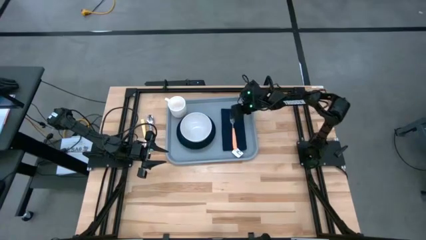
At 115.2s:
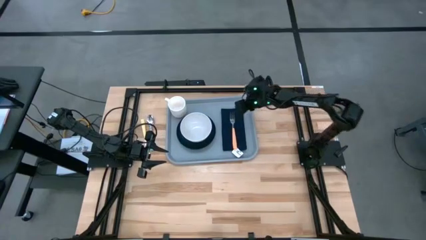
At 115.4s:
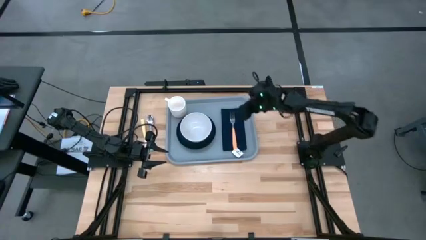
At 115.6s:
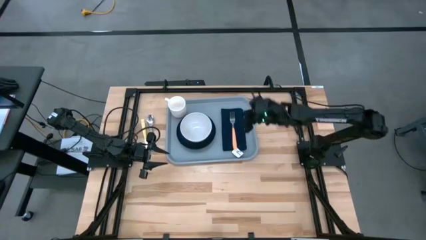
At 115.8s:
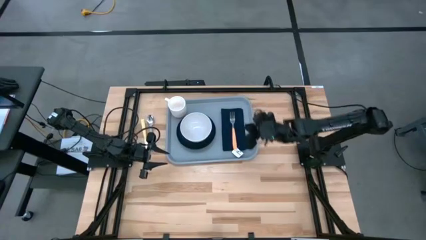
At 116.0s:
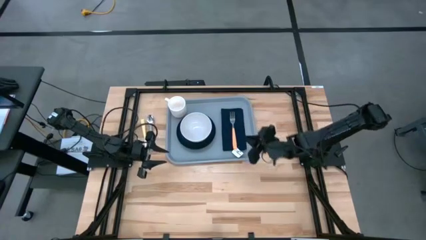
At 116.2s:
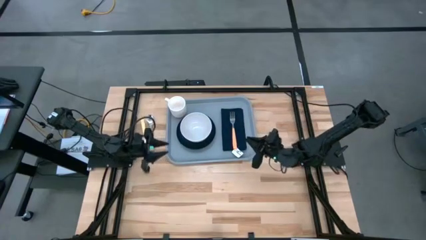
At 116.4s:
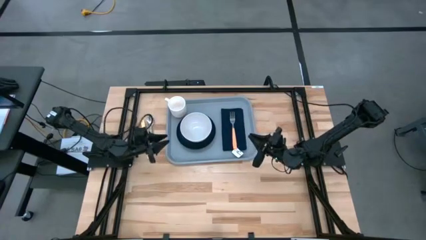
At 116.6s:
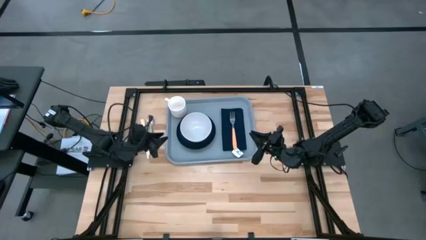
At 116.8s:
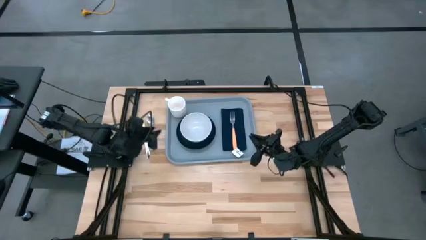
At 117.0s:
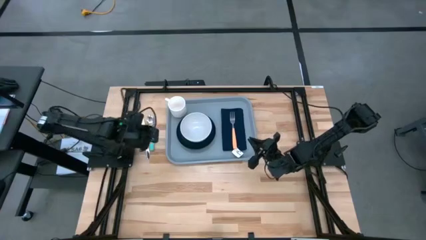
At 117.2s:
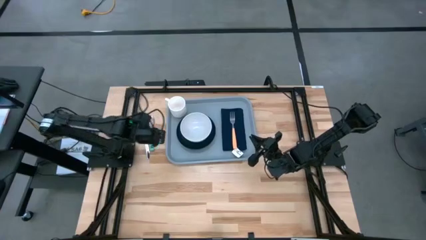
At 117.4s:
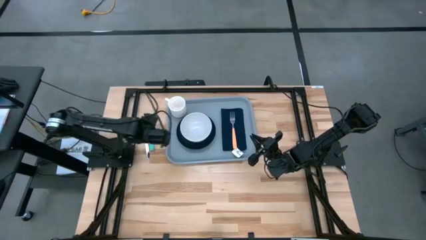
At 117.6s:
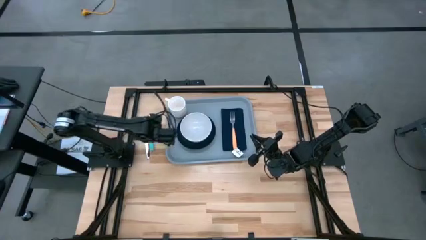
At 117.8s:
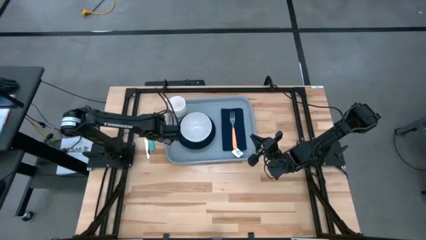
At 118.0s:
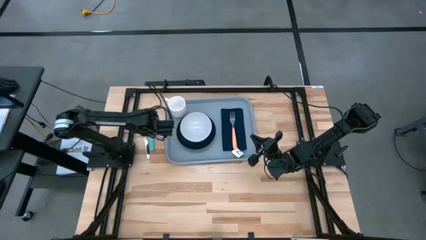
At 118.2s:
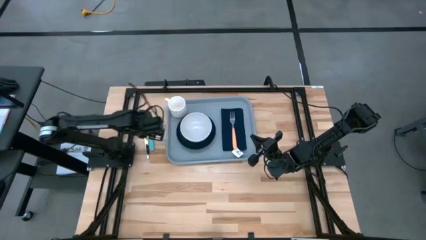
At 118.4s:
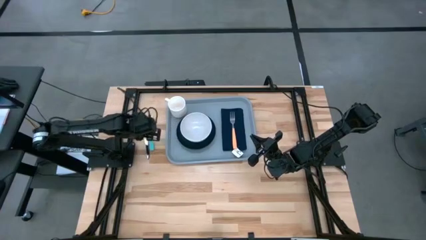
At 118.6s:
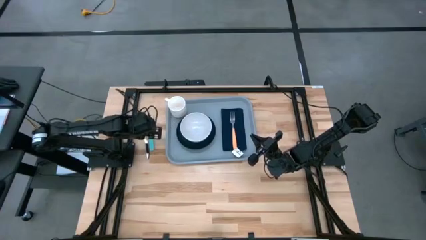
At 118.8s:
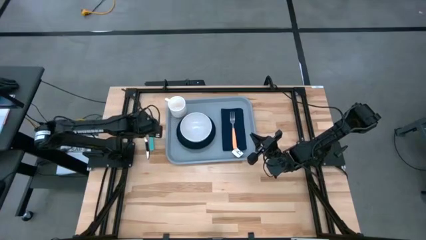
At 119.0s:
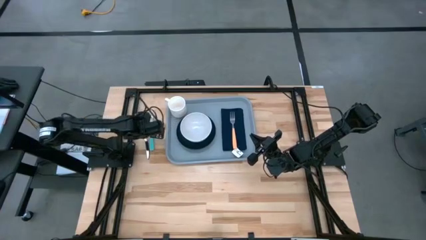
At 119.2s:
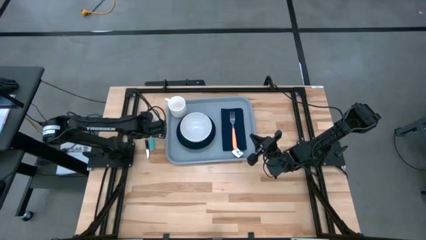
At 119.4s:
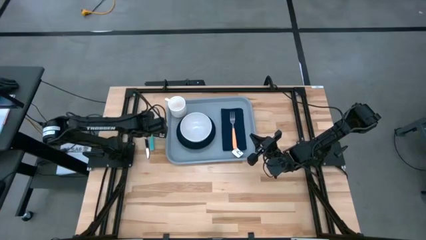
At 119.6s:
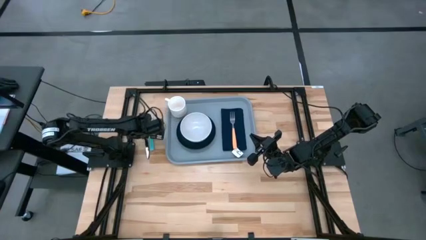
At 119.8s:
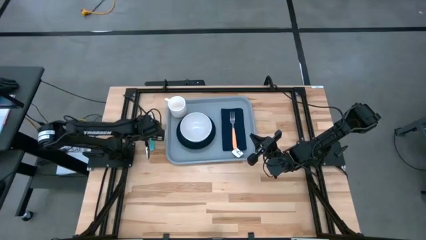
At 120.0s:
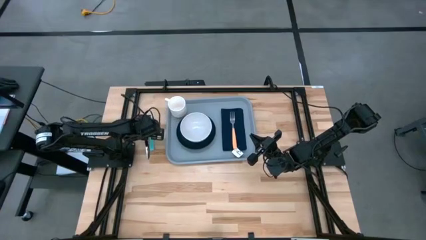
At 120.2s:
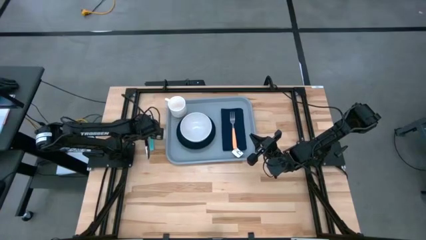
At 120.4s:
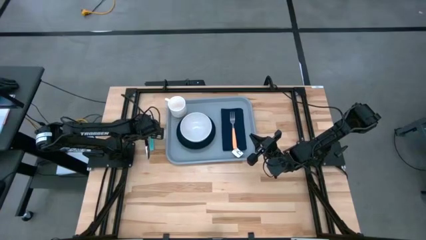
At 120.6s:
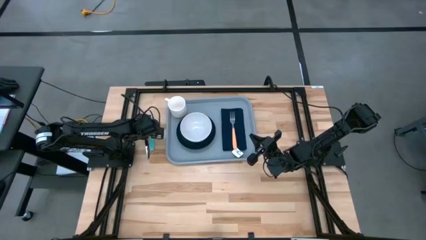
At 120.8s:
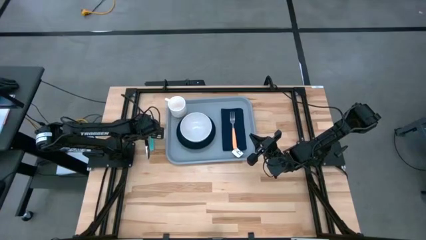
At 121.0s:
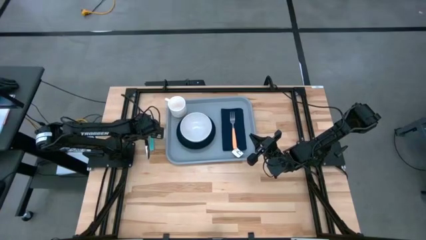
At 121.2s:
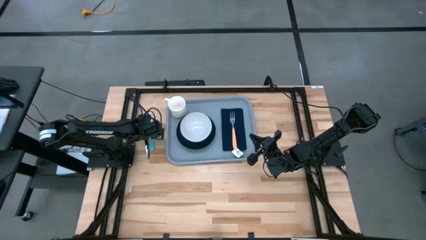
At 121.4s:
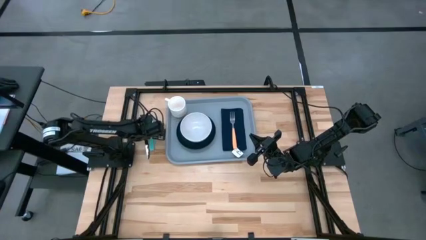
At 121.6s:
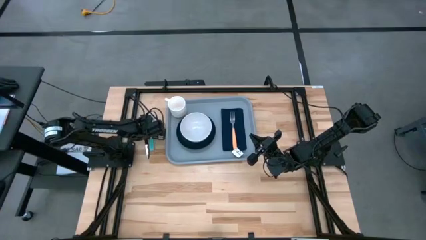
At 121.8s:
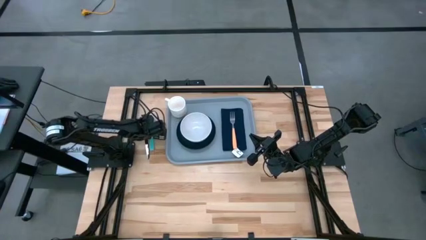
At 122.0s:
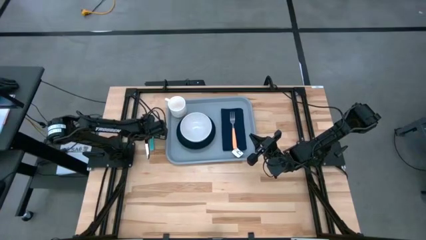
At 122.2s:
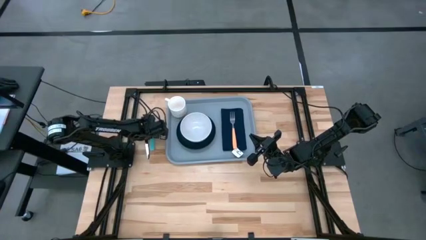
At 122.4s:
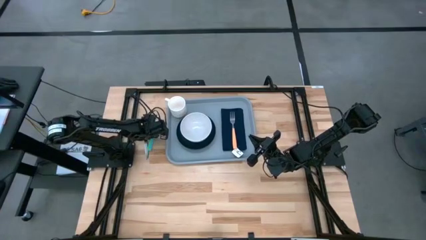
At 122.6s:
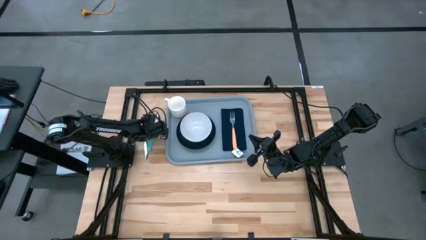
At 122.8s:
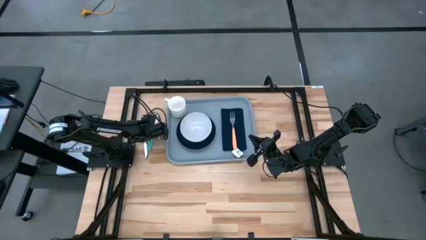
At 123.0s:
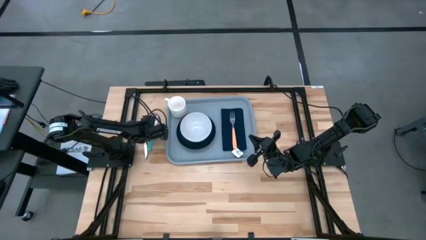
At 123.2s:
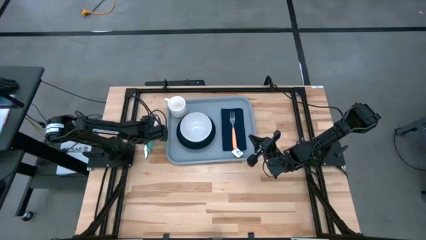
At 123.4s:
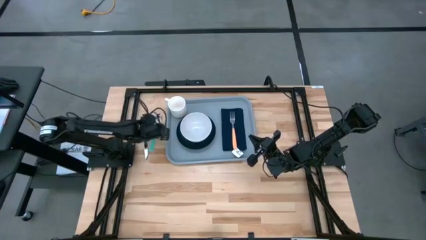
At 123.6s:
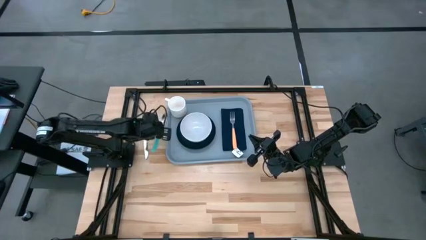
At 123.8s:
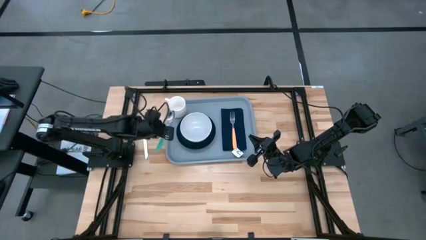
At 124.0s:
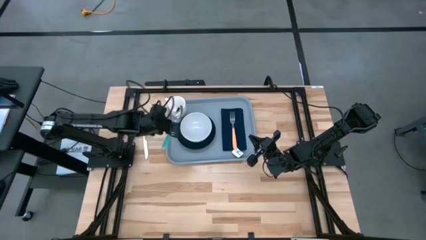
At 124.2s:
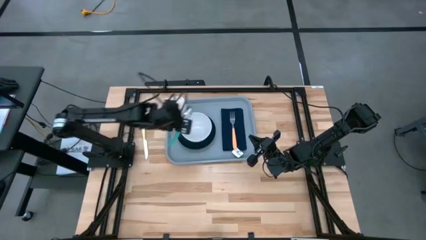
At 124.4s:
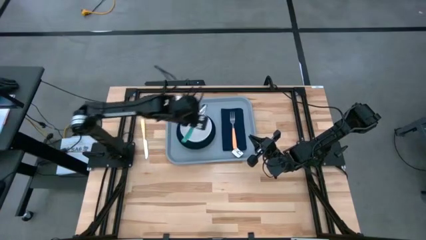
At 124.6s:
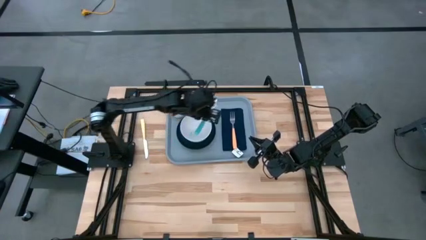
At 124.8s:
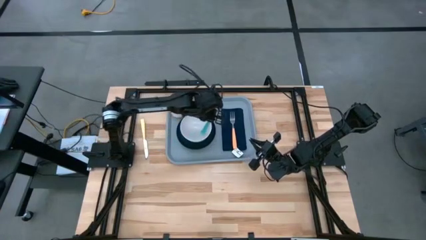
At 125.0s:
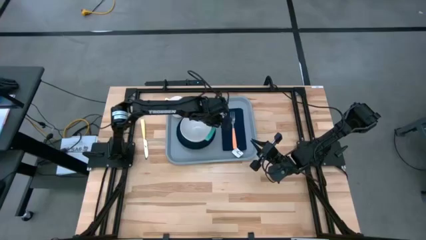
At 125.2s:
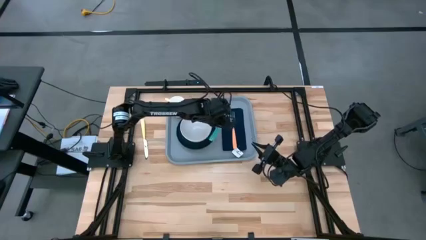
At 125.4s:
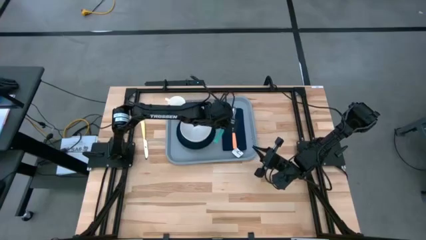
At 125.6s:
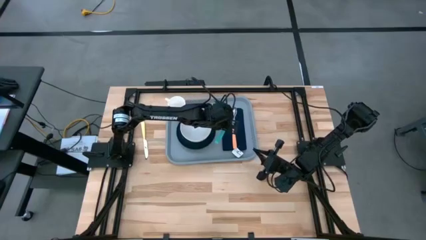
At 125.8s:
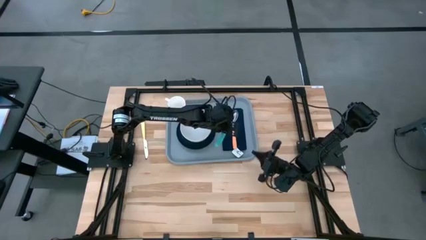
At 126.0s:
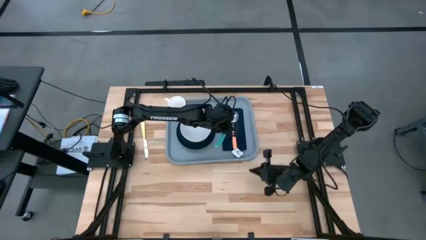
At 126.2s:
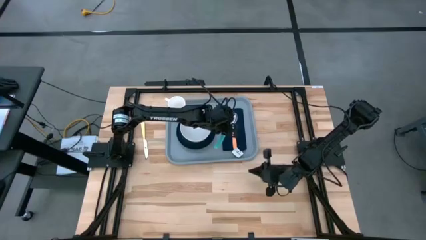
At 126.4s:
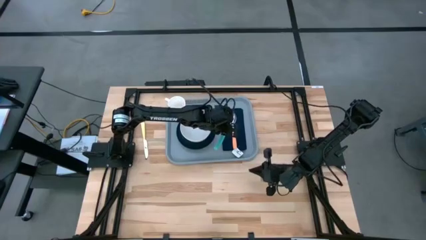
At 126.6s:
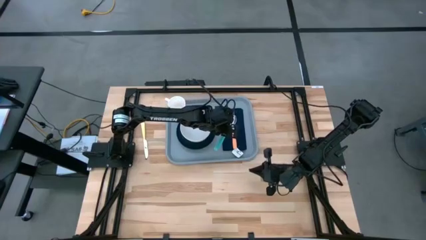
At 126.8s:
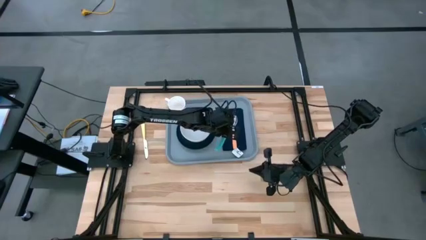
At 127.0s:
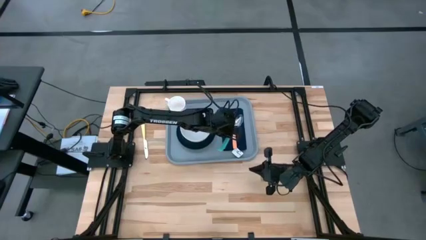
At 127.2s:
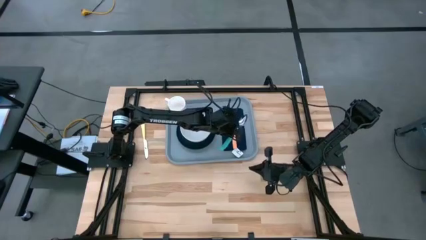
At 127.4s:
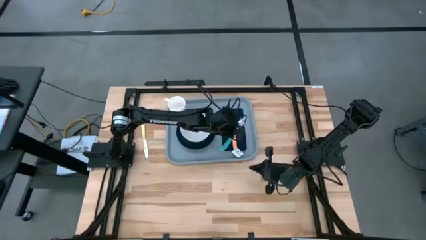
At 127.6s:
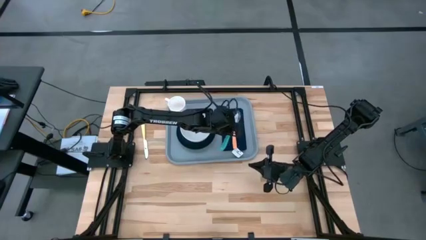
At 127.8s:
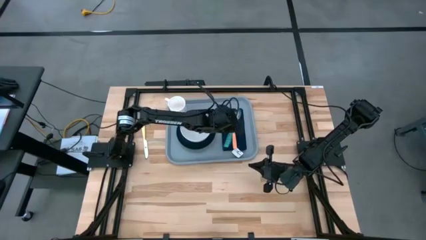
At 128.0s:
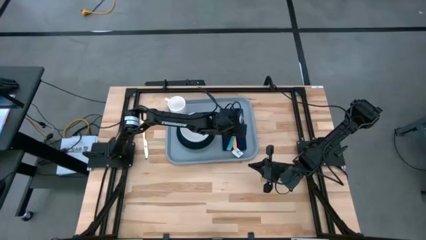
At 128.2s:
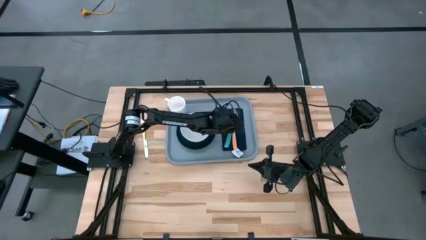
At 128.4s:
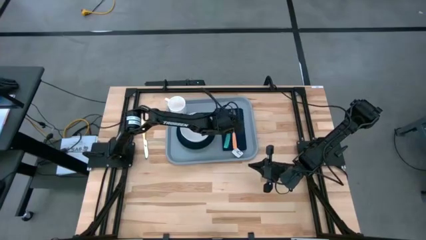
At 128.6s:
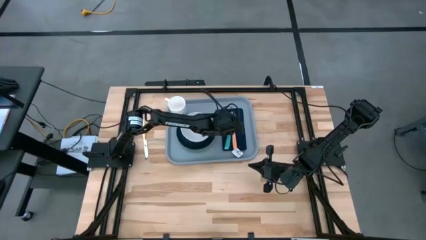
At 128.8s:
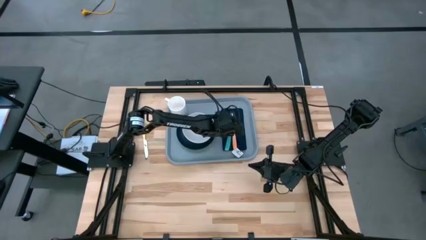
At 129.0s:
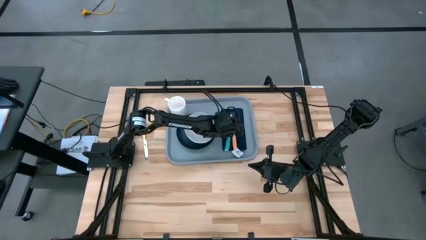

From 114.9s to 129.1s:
Task: Set up tray
Put the green spoon on the black napkin to the left of the orange fork
